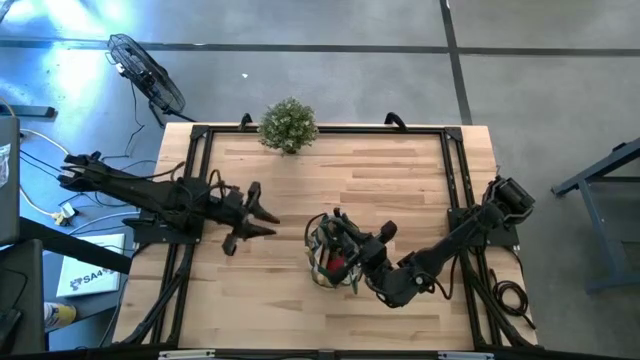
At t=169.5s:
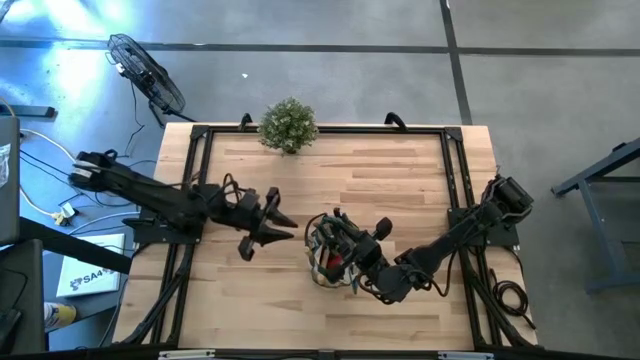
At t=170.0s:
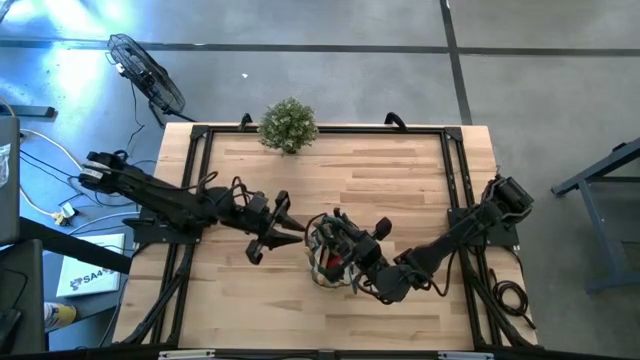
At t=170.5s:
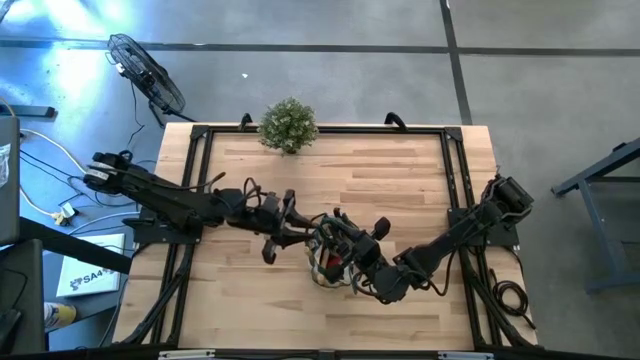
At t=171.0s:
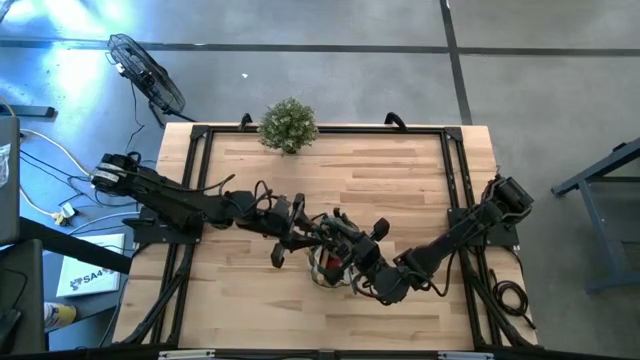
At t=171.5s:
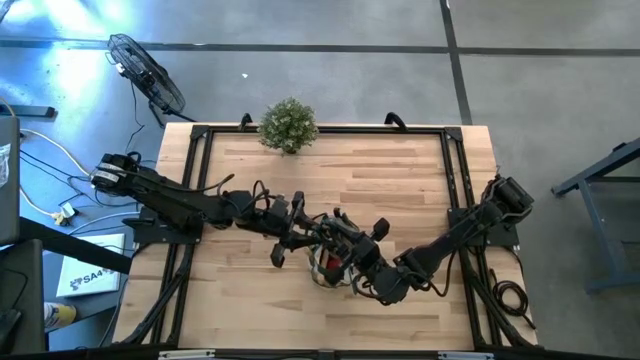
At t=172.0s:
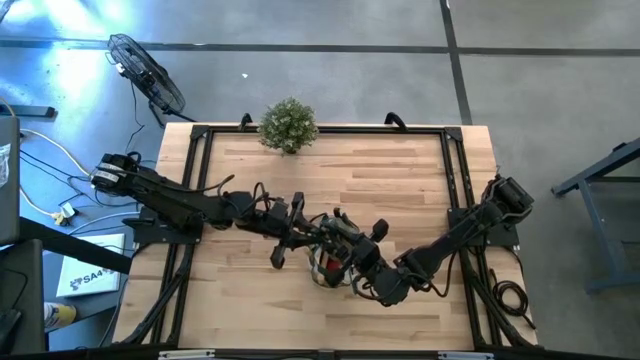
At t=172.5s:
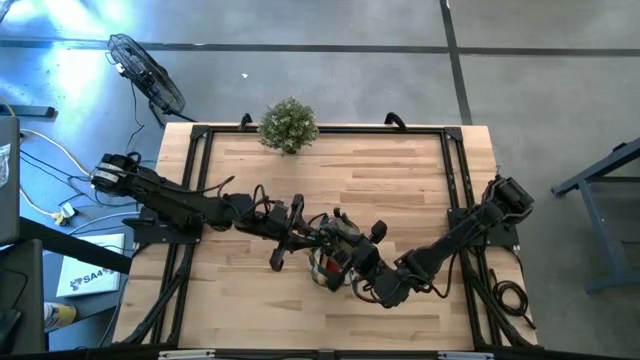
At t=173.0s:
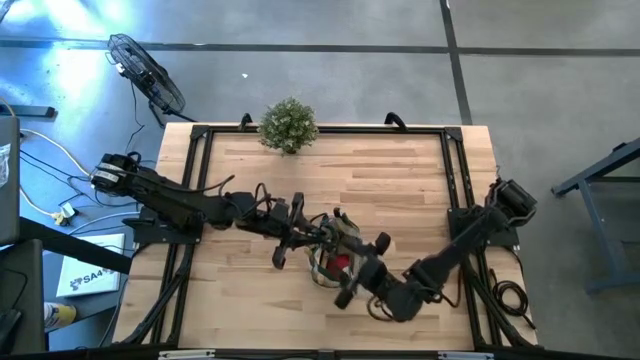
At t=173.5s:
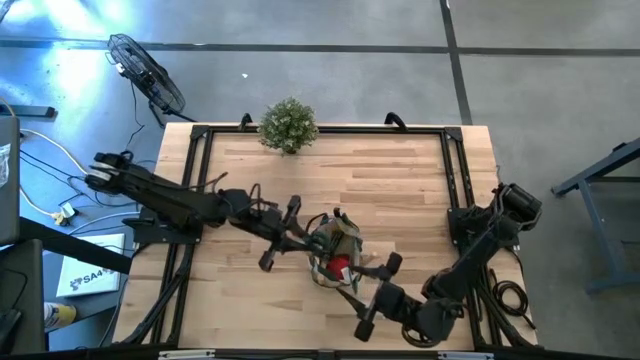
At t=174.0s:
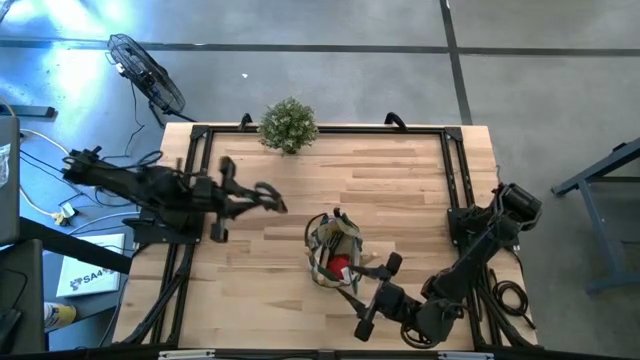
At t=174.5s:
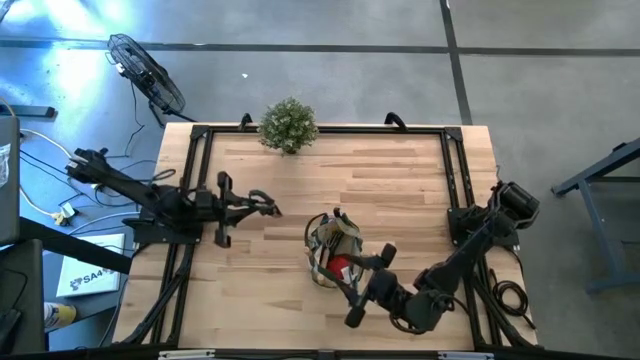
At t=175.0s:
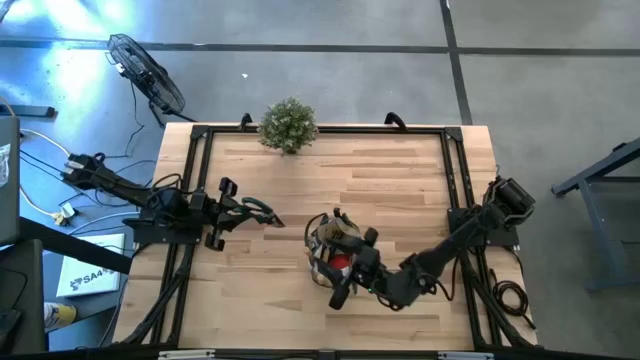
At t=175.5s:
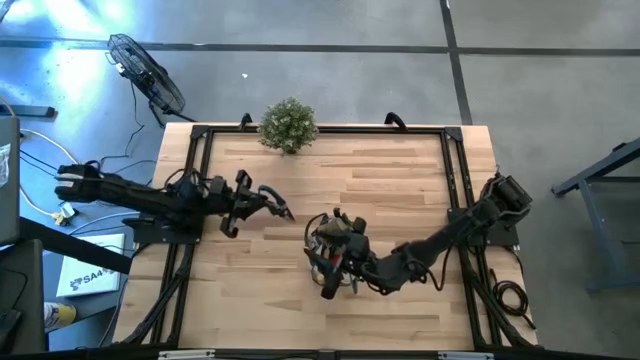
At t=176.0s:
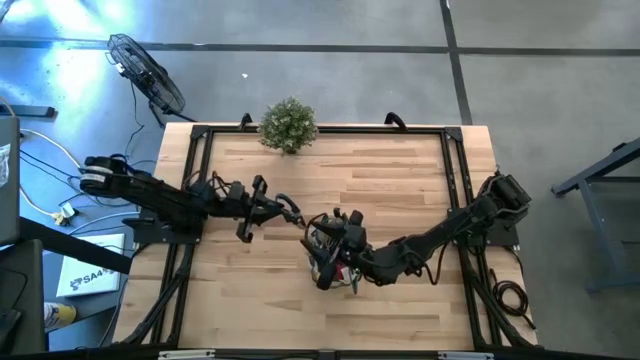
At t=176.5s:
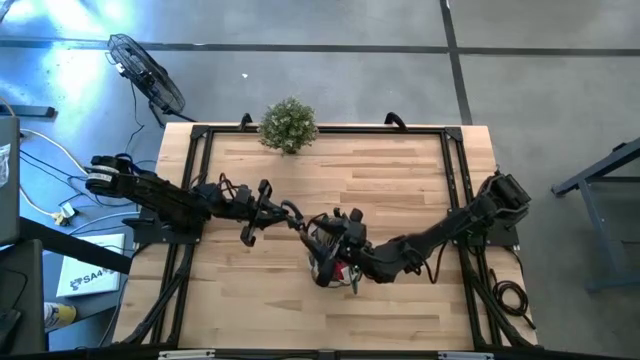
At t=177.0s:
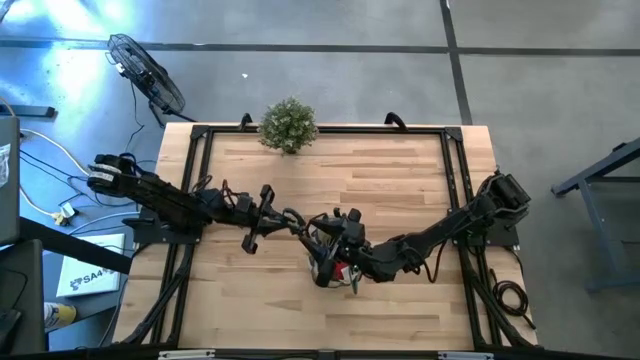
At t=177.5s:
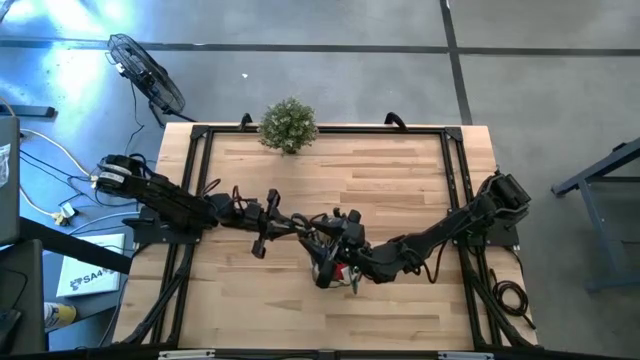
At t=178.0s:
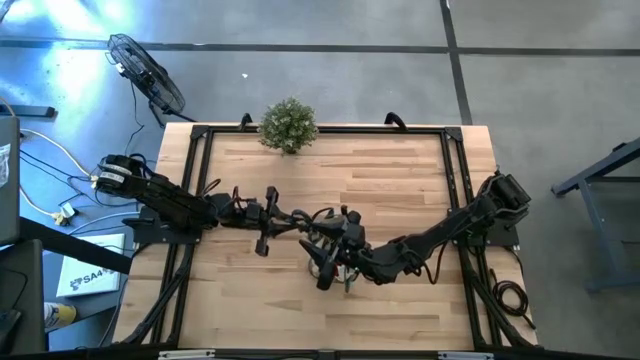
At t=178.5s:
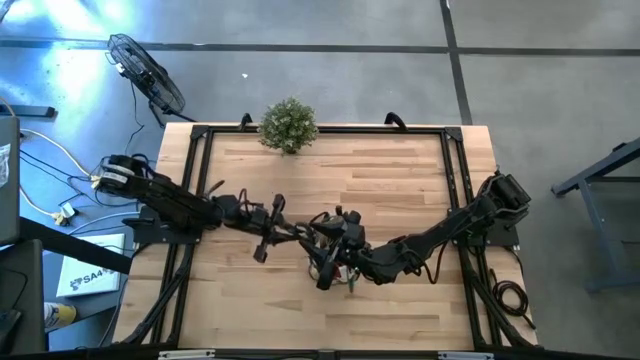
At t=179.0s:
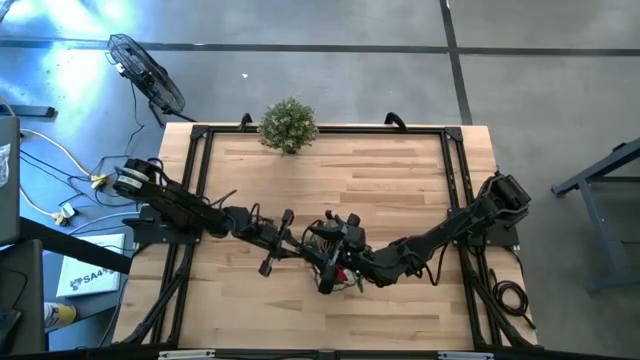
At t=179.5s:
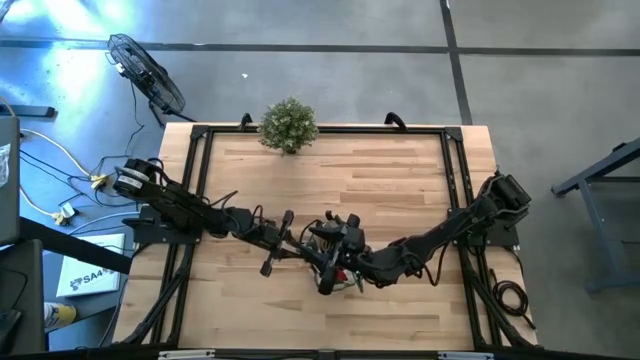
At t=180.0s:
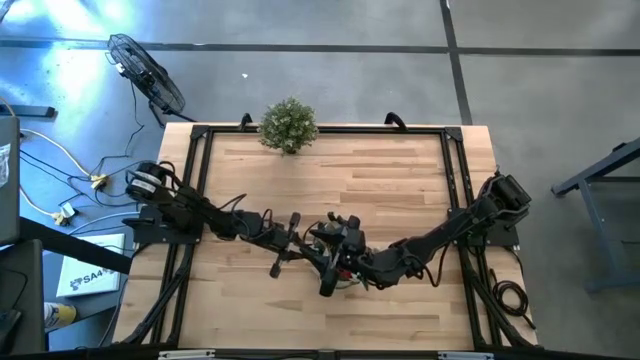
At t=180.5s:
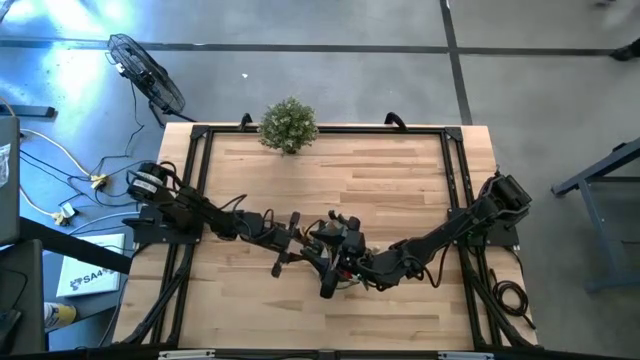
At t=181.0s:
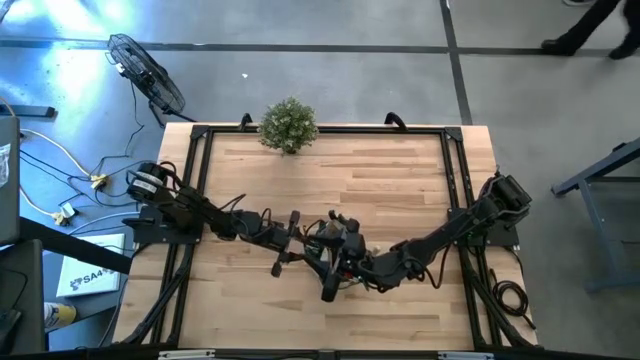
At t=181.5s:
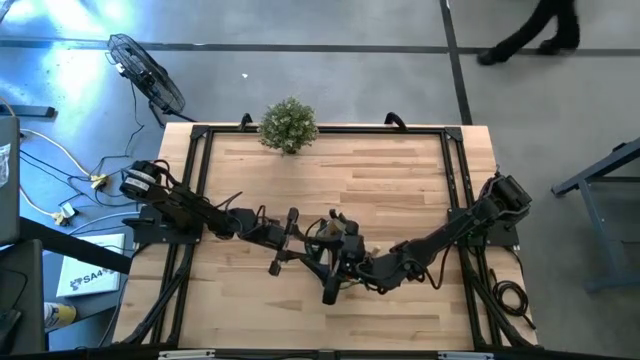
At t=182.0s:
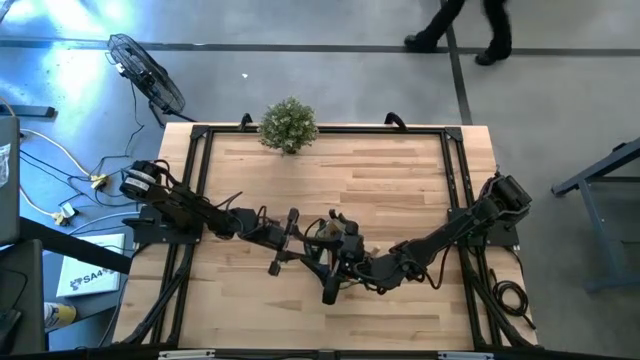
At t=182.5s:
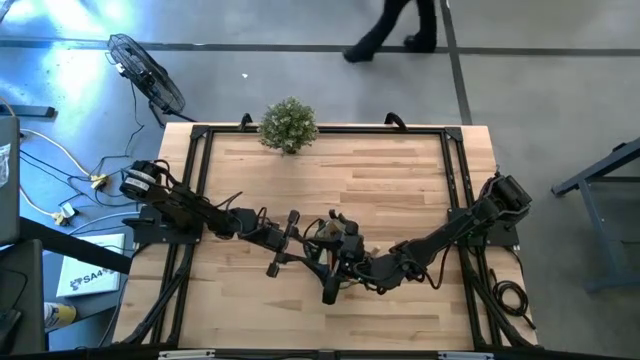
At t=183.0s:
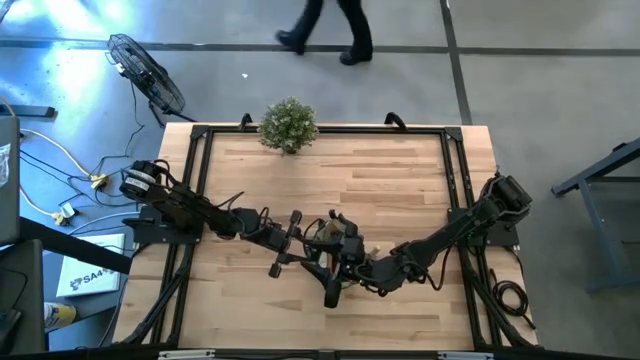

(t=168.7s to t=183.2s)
Task: Pick & Place Garden tools in Gardening bag
Put the green scissors into the green bag

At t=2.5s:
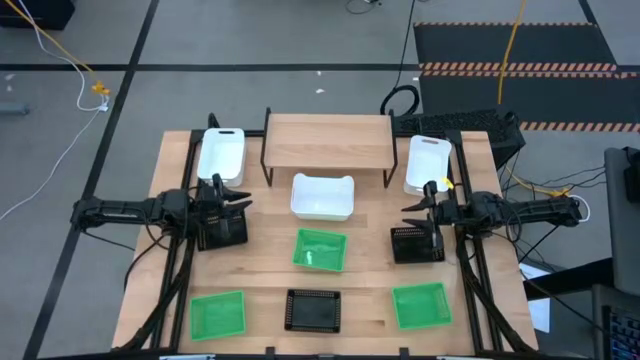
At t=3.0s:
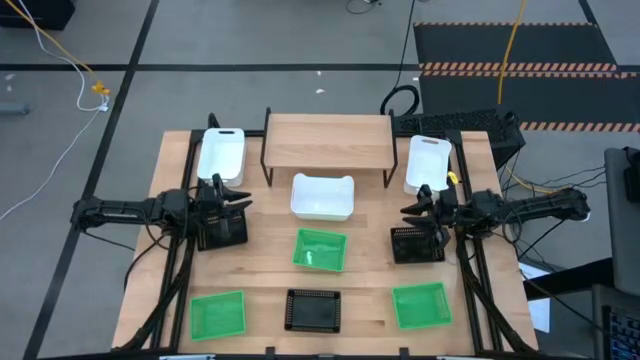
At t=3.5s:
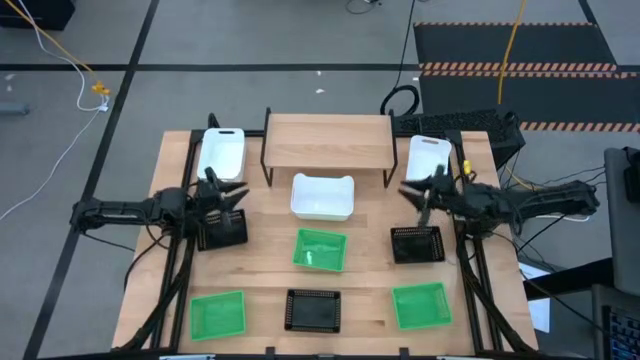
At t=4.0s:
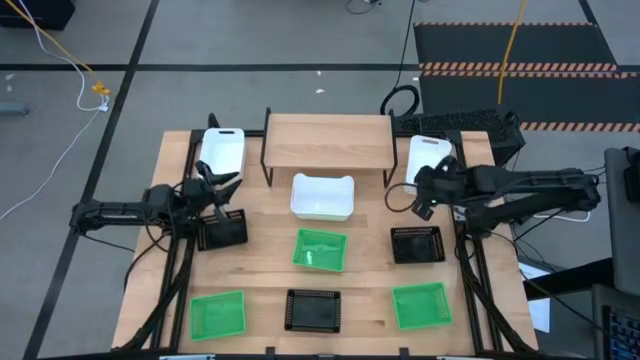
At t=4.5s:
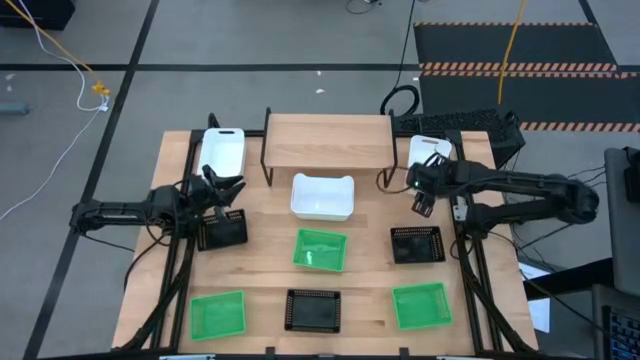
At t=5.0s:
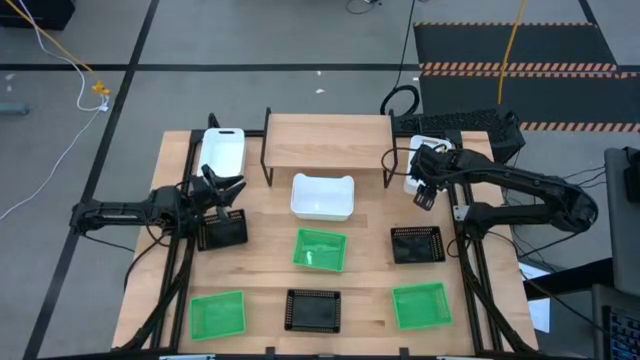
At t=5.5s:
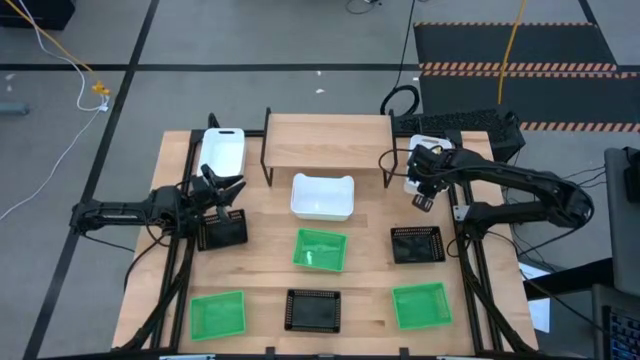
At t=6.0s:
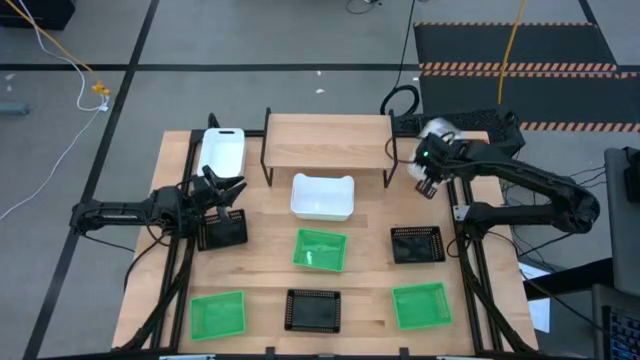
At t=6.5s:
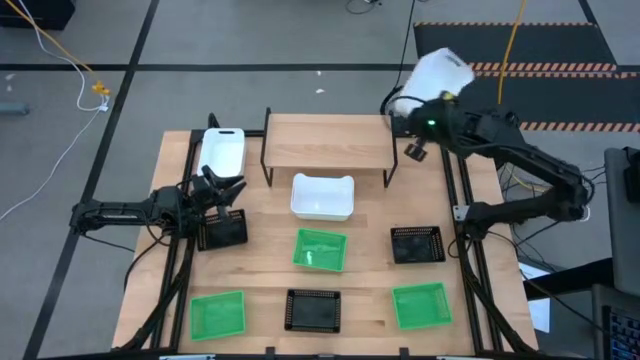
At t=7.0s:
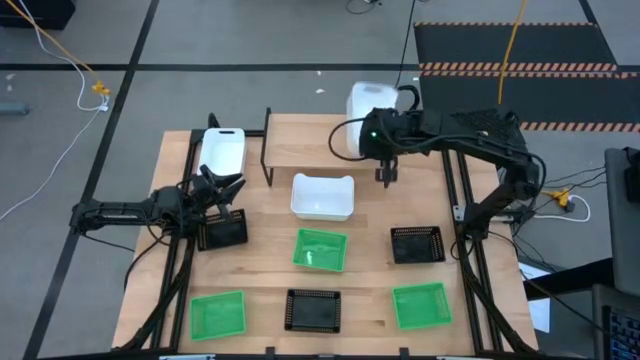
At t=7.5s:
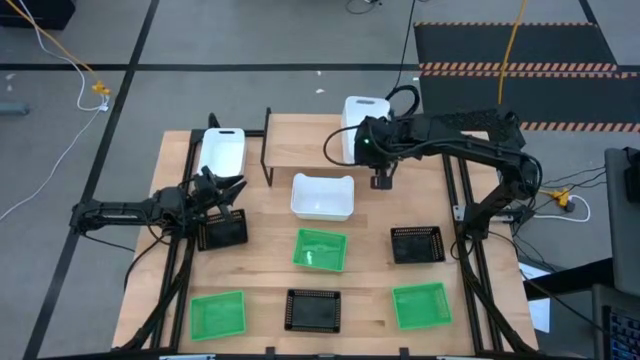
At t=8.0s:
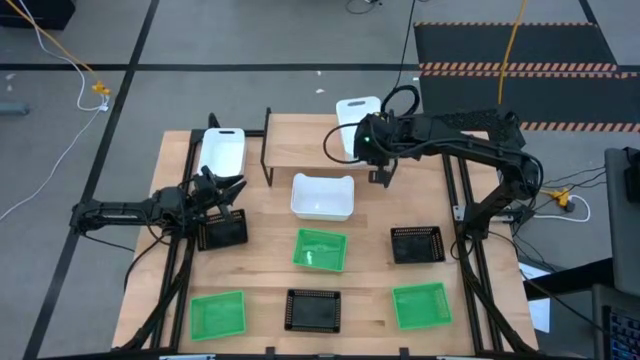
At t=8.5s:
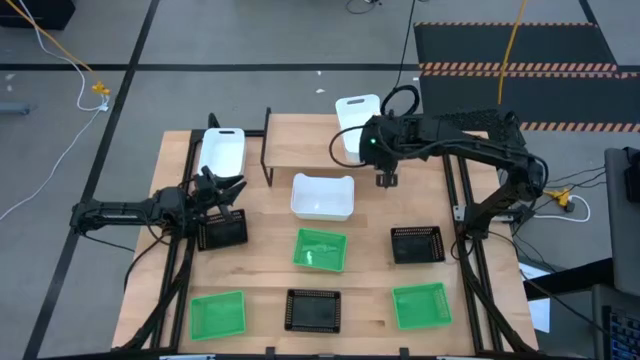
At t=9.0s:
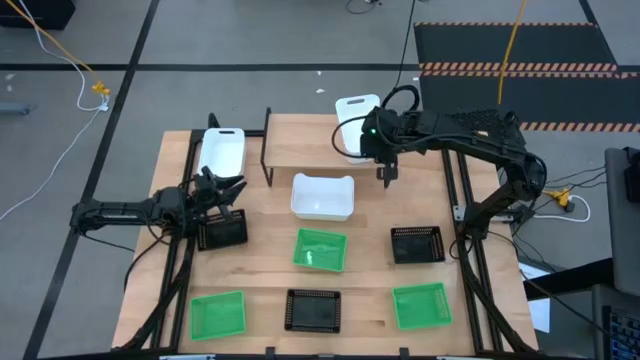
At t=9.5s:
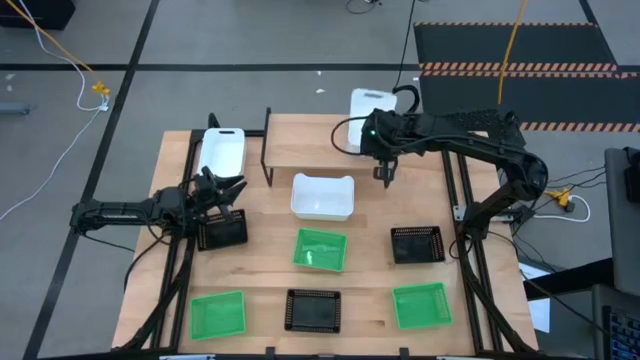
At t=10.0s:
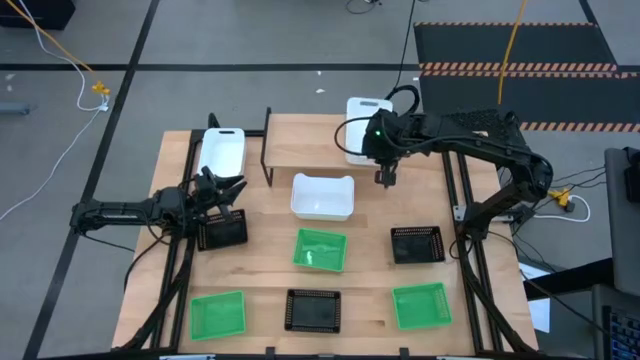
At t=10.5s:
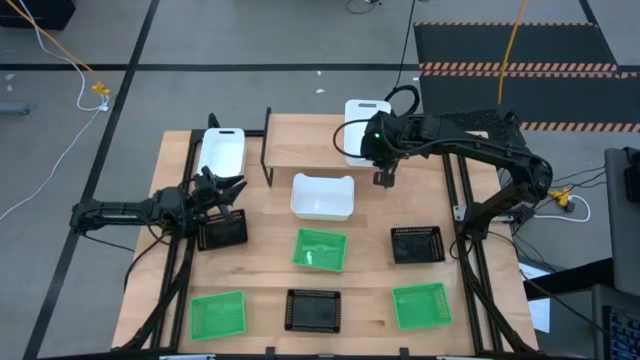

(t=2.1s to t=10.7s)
Task: Stack baskets on shelf by color
Put the top right white bin on the shelf
